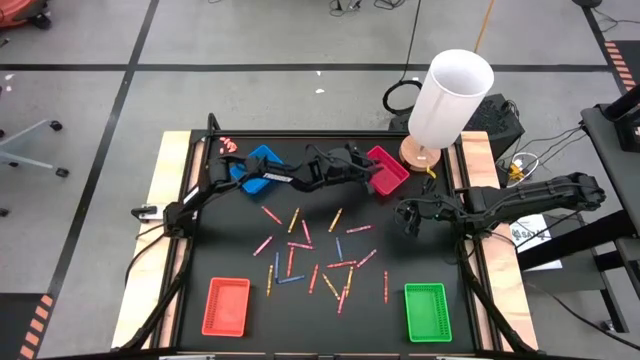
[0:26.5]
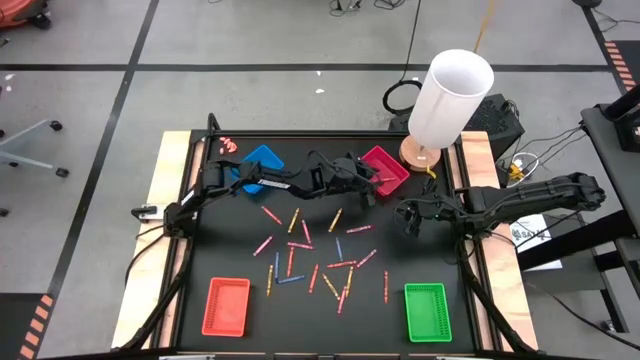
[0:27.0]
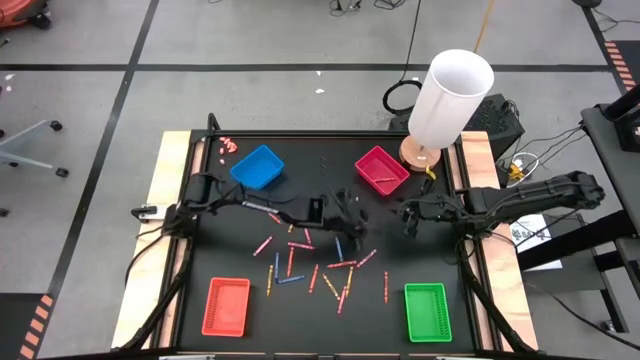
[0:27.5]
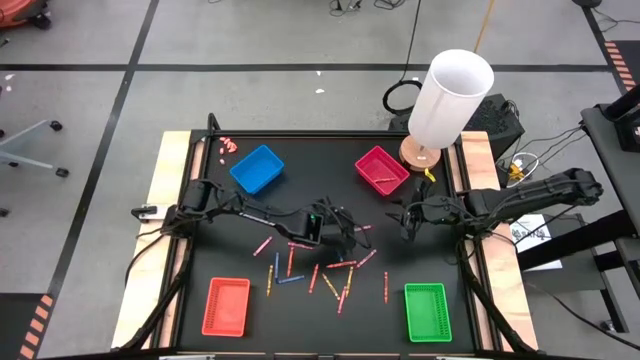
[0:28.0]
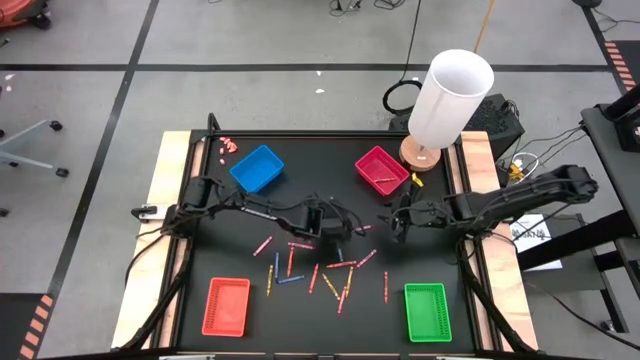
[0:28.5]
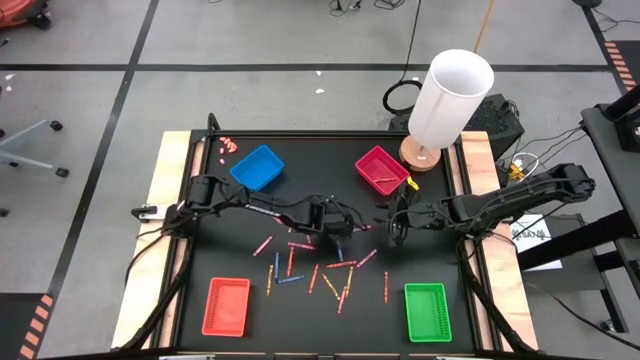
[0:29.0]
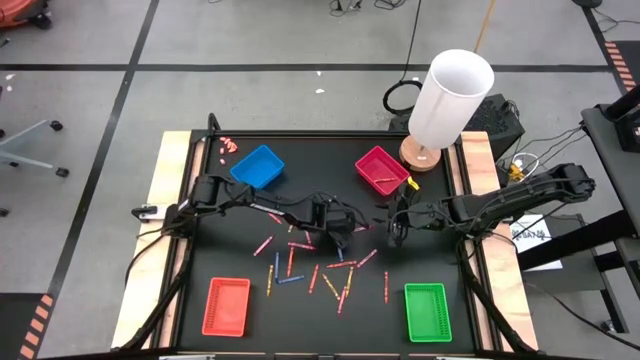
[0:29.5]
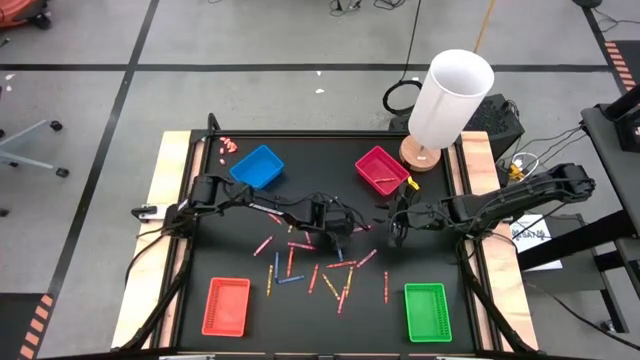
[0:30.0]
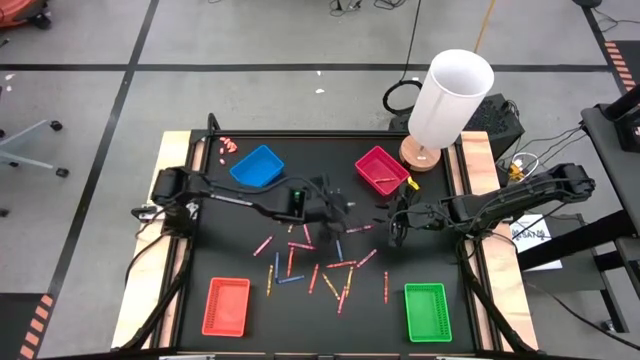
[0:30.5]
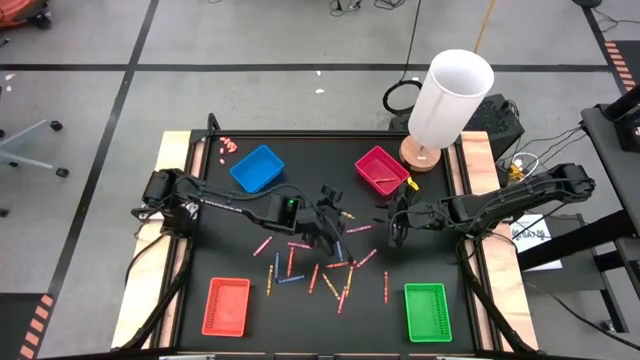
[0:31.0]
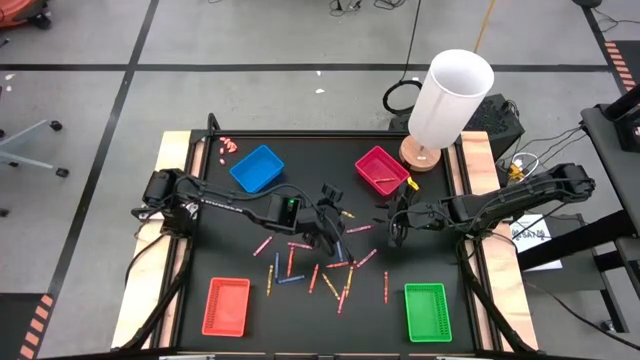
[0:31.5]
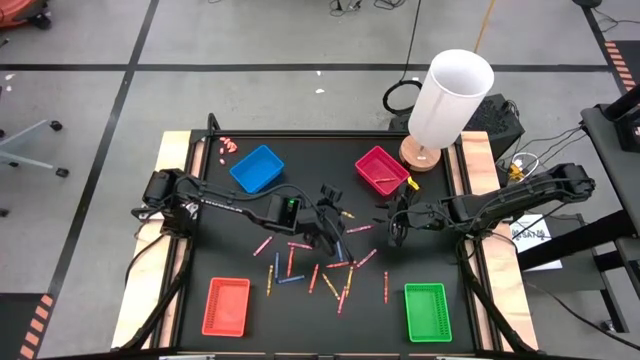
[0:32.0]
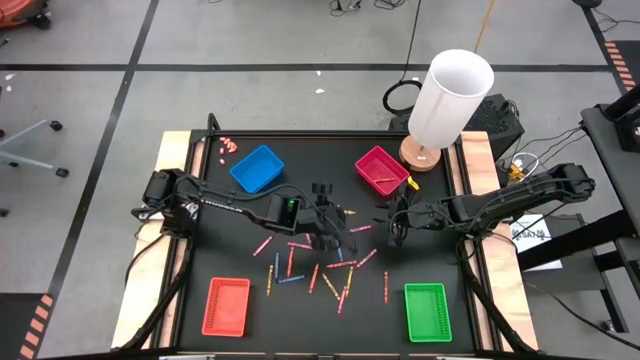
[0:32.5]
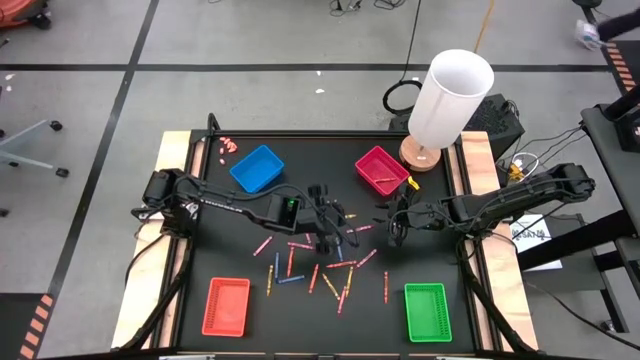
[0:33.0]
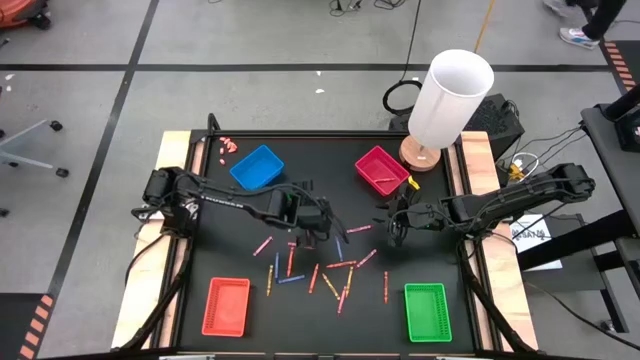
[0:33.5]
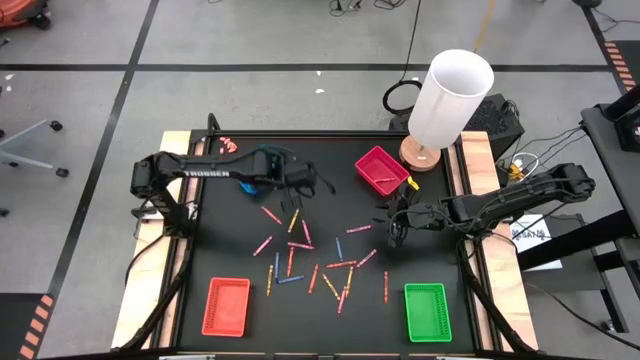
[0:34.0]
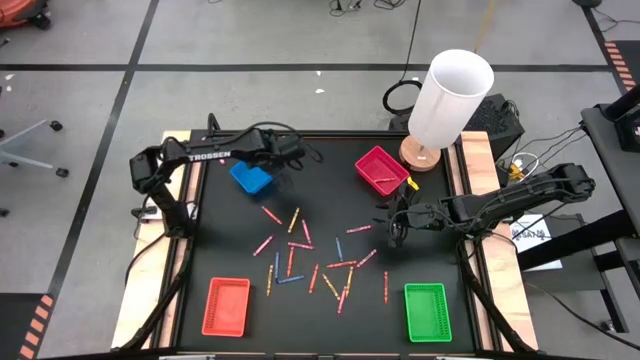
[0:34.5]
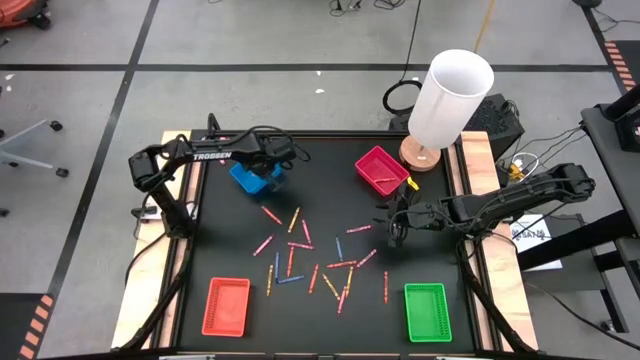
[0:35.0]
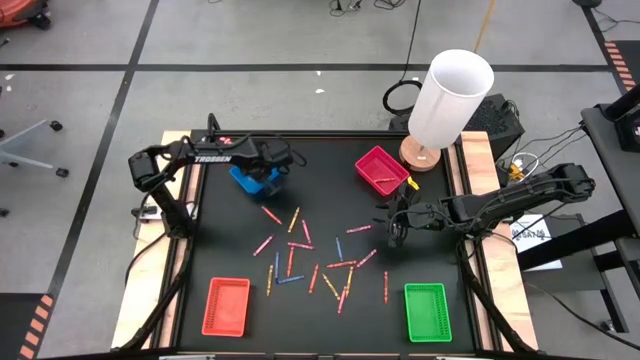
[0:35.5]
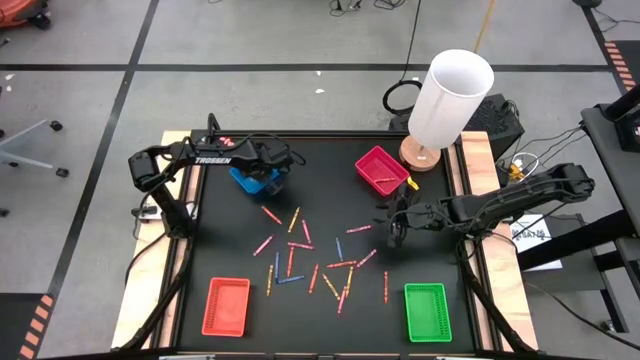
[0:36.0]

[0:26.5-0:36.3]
Task: Sort crayons
Put the yellow crayon into the blue bin

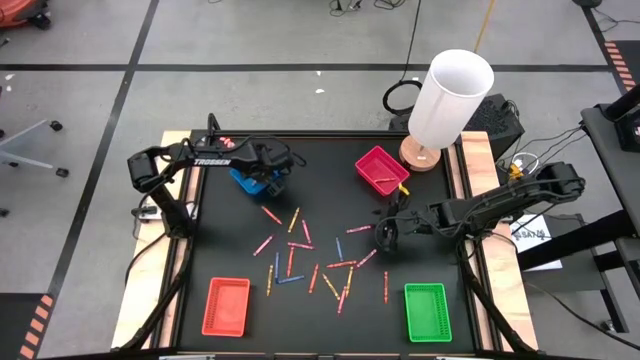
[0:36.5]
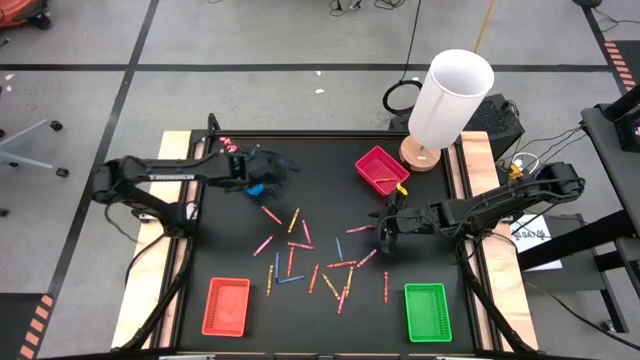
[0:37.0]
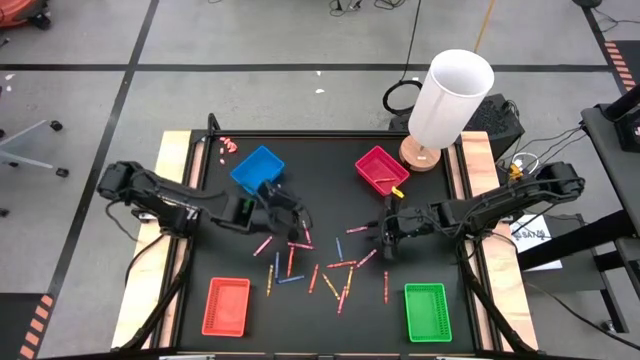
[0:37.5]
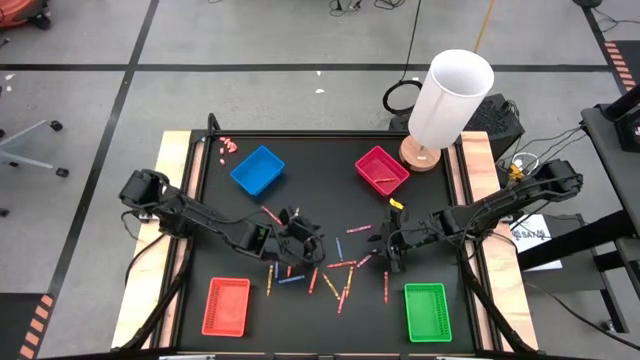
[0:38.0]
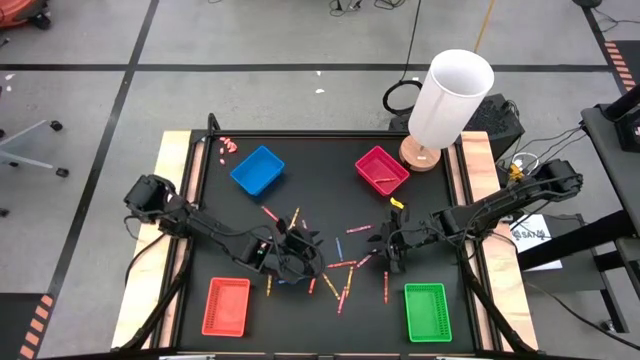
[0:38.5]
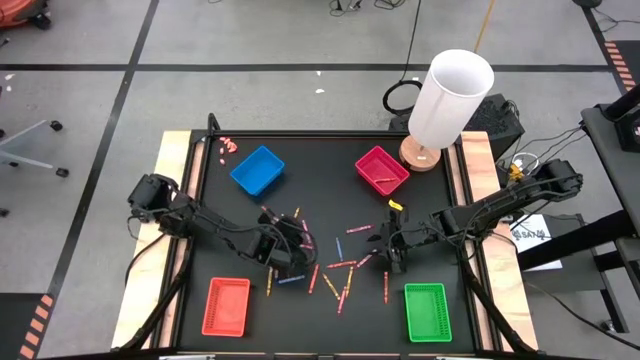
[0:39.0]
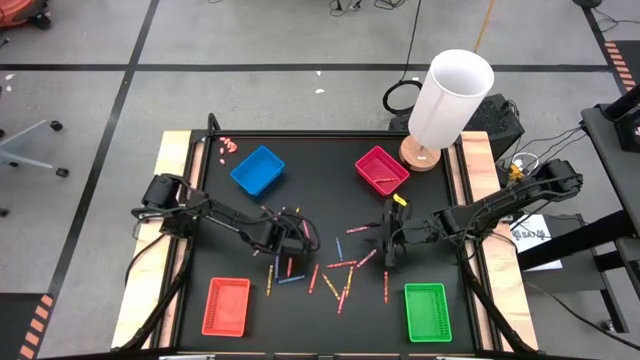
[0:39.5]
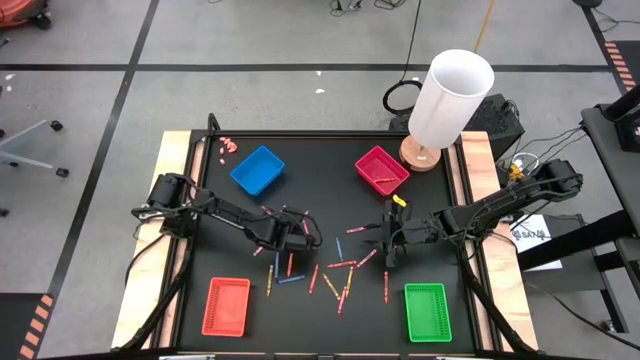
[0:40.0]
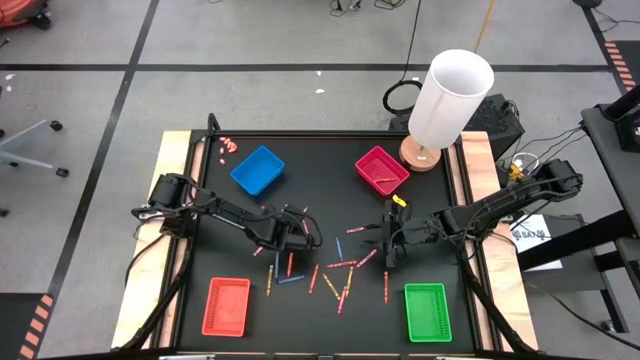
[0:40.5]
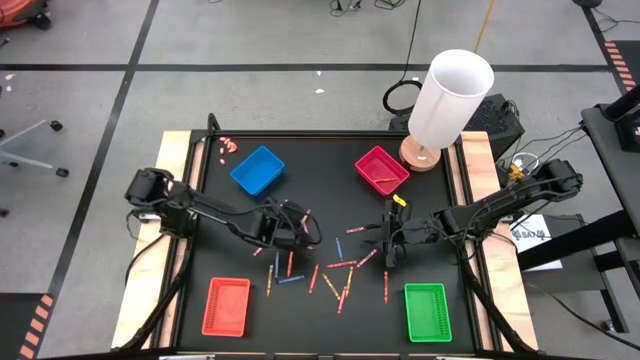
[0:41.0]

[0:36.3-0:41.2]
Put the yellow crayon into the blue bin

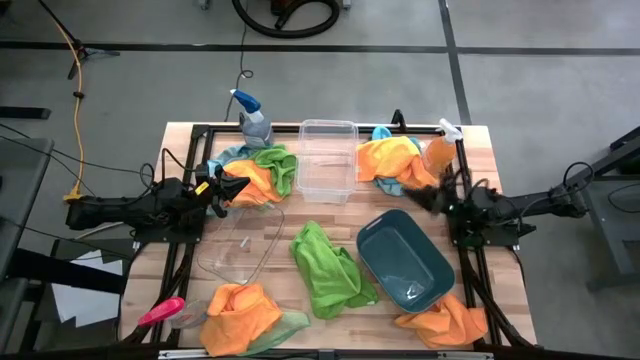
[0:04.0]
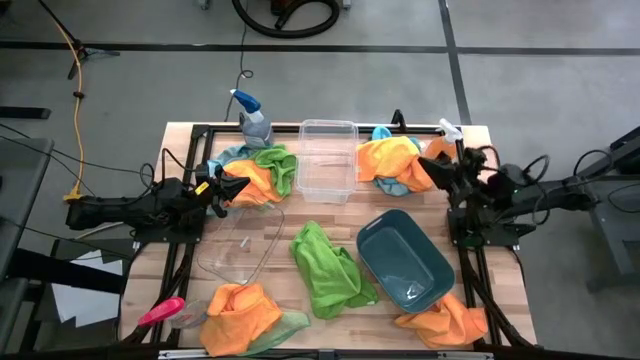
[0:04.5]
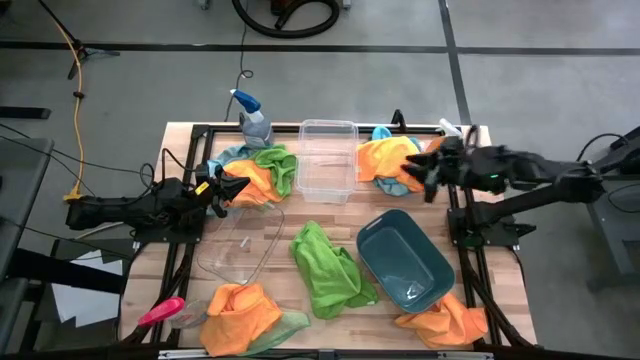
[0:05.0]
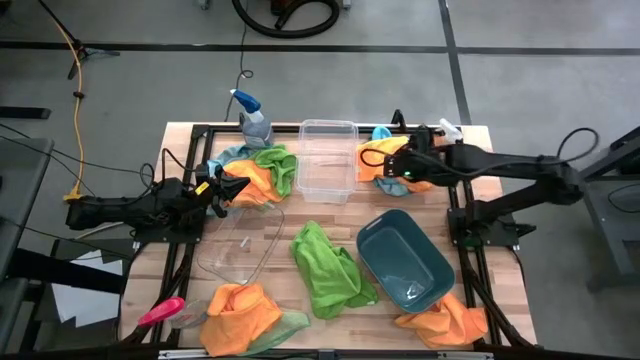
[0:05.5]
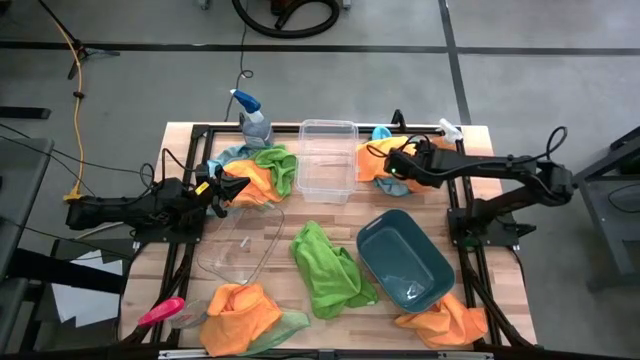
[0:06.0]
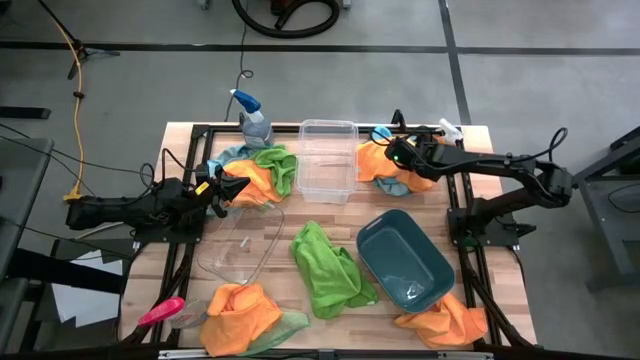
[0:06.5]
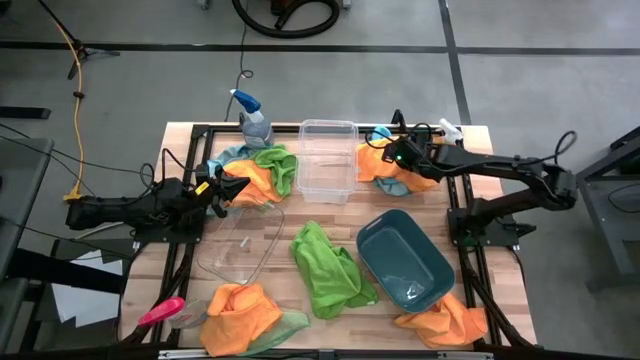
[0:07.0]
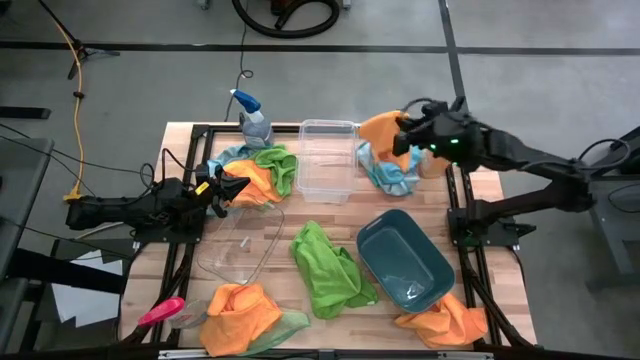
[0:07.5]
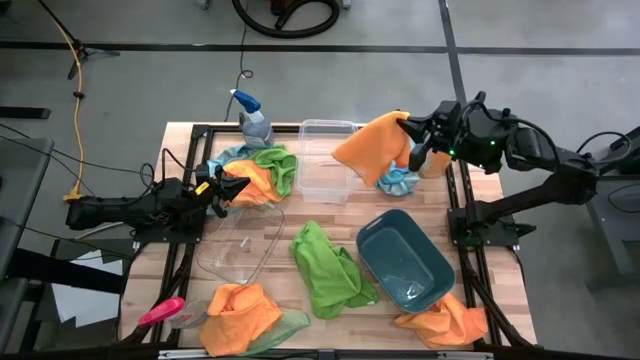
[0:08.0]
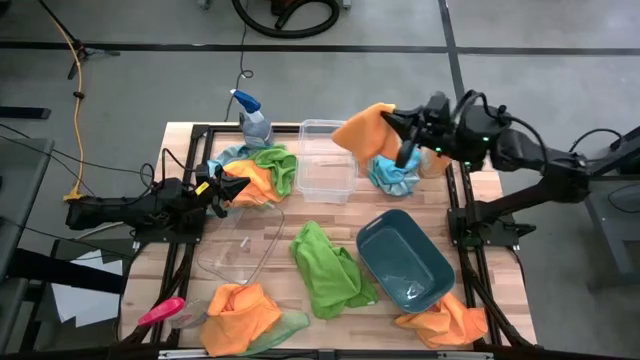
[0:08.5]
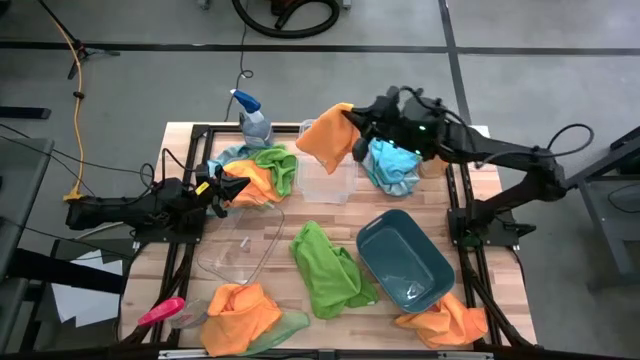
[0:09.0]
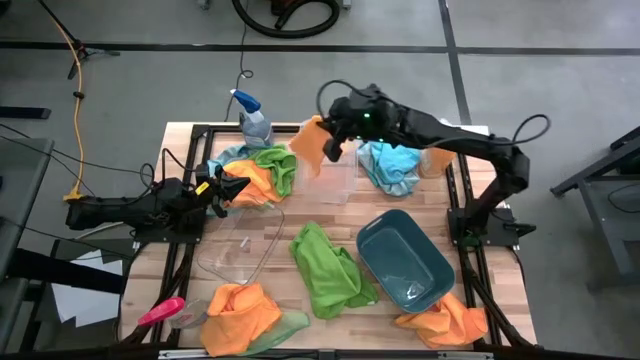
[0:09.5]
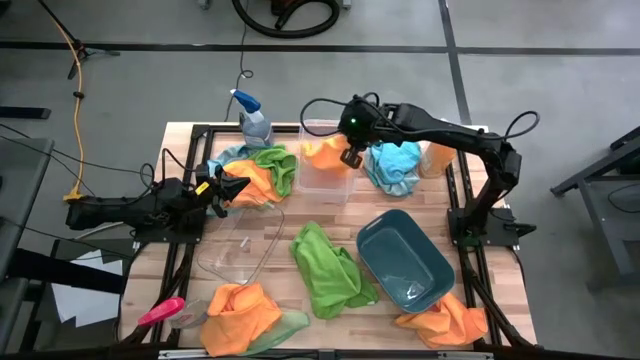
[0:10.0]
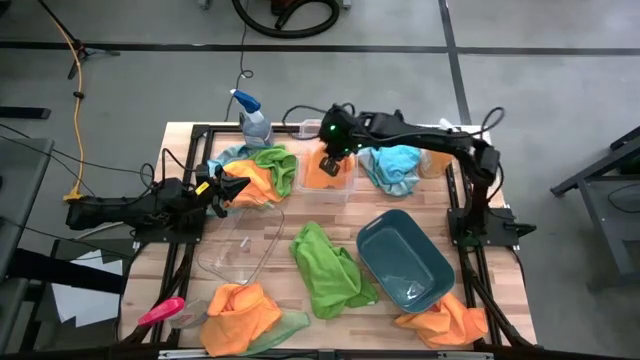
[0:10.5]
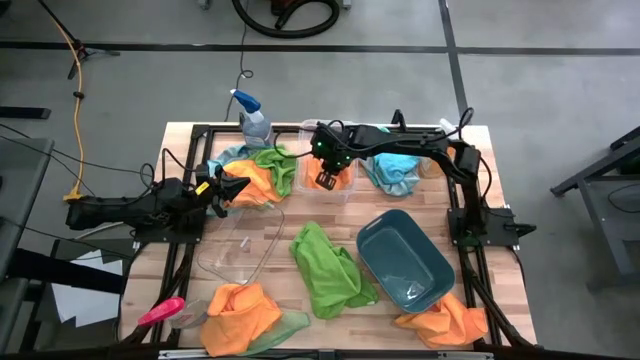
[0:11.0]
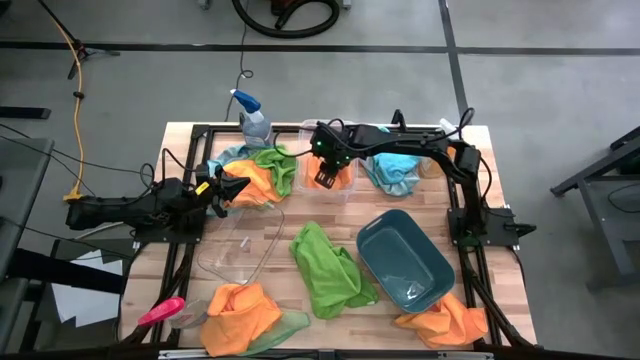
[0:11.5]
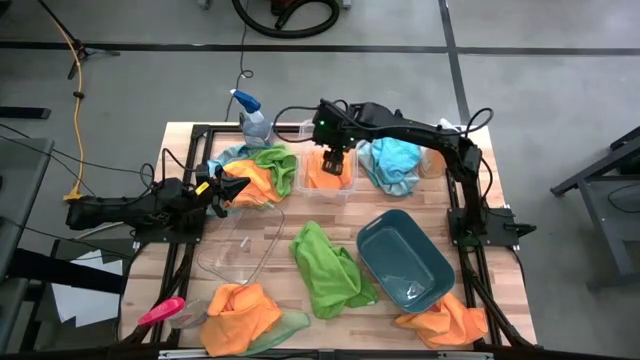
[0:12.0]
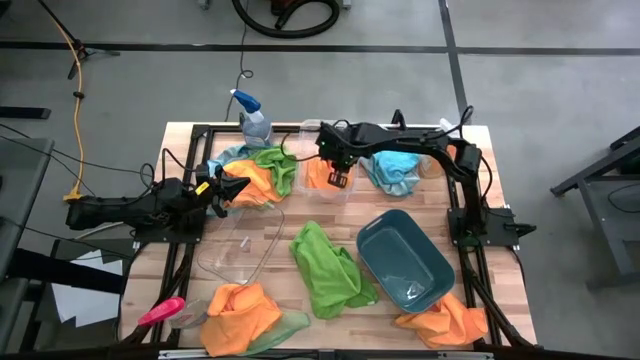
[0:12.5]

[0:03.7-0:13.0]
Task: Sort microfiber towel by color & place in baskets
Put the orange microfiber towel into the top transparent bin
